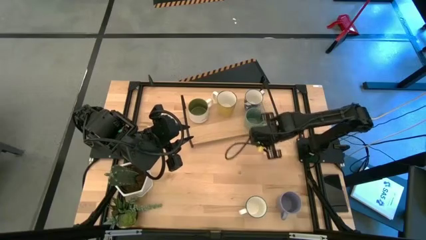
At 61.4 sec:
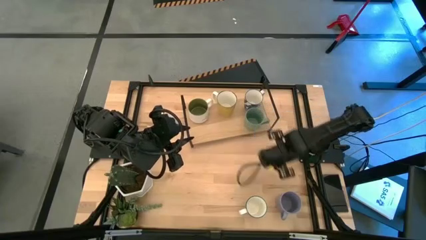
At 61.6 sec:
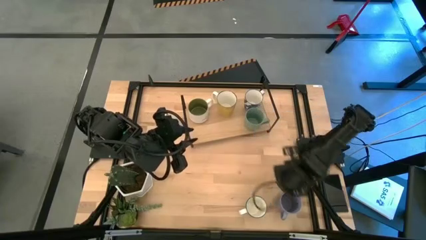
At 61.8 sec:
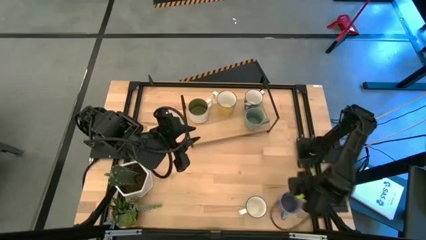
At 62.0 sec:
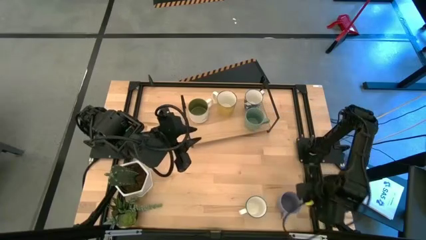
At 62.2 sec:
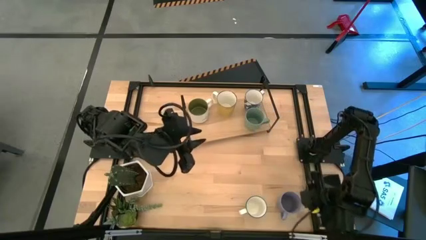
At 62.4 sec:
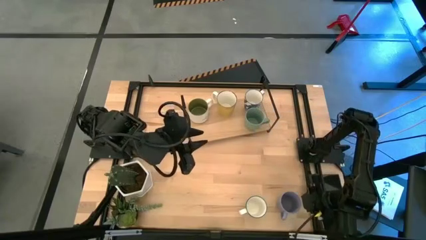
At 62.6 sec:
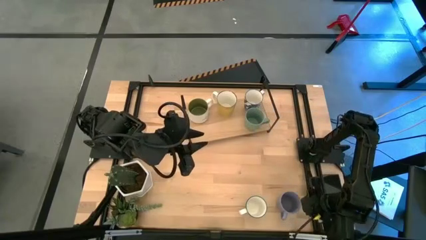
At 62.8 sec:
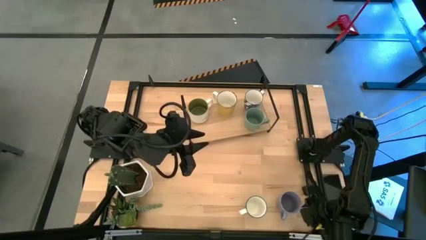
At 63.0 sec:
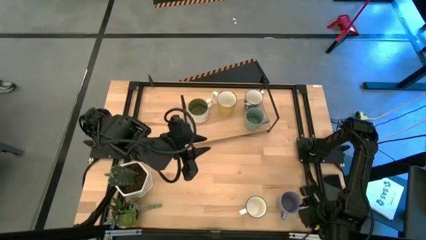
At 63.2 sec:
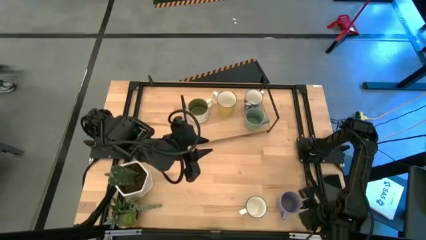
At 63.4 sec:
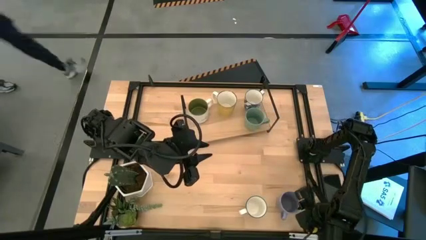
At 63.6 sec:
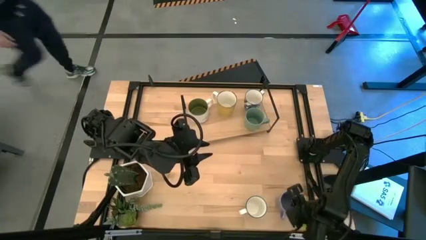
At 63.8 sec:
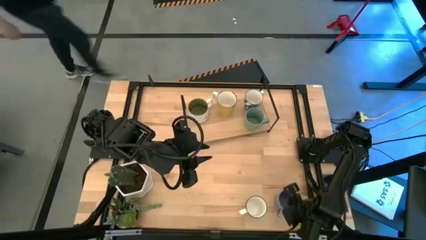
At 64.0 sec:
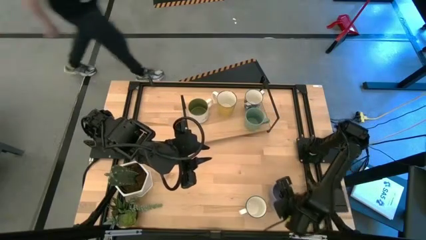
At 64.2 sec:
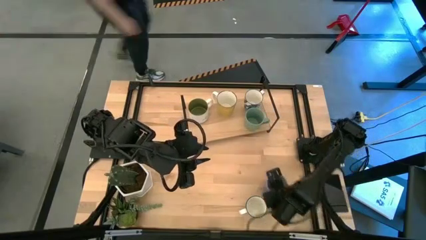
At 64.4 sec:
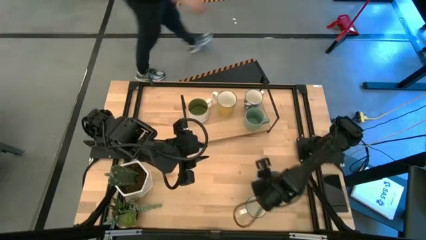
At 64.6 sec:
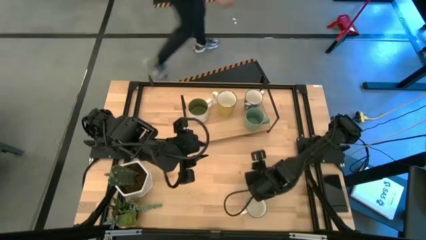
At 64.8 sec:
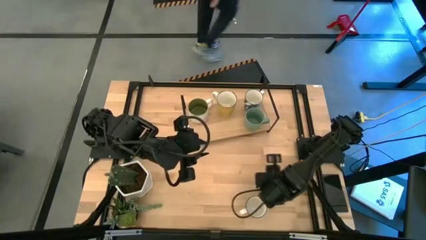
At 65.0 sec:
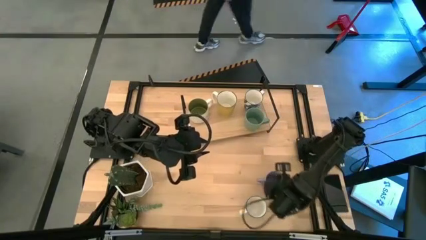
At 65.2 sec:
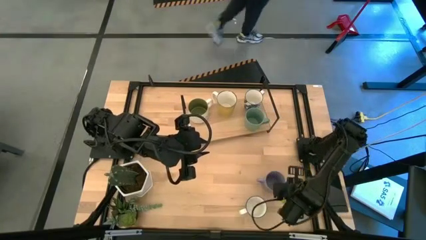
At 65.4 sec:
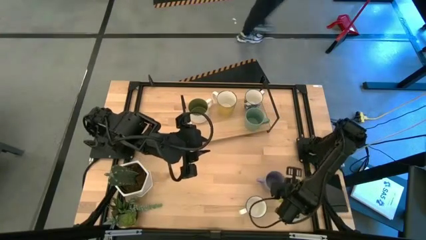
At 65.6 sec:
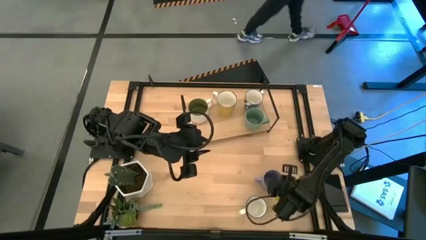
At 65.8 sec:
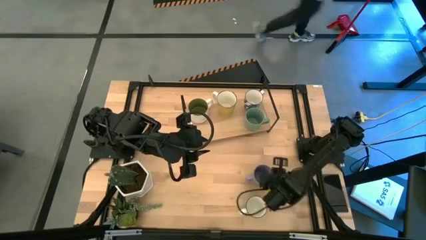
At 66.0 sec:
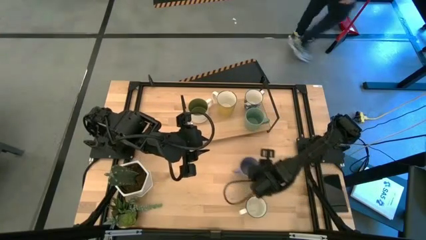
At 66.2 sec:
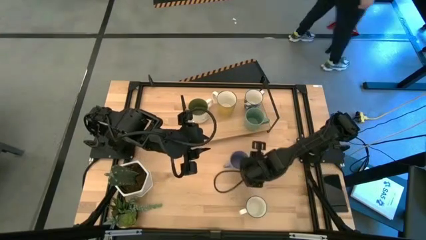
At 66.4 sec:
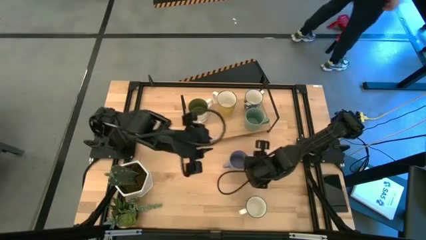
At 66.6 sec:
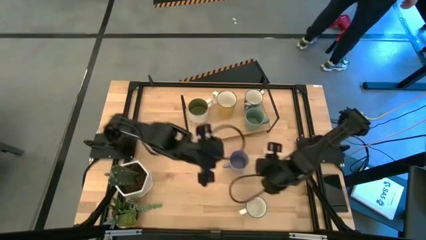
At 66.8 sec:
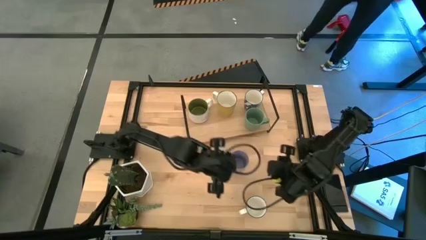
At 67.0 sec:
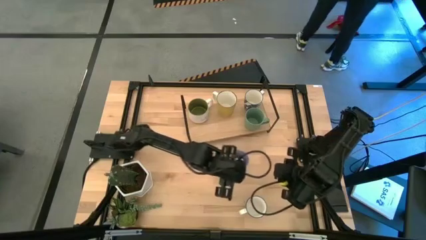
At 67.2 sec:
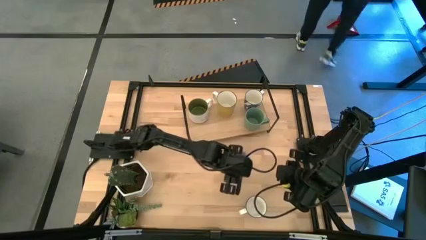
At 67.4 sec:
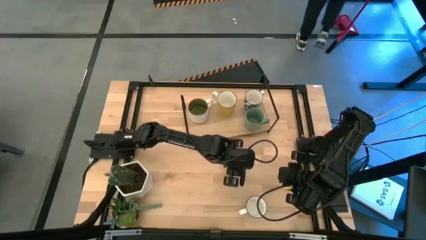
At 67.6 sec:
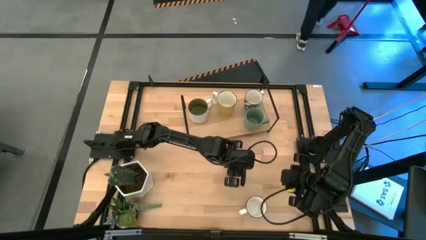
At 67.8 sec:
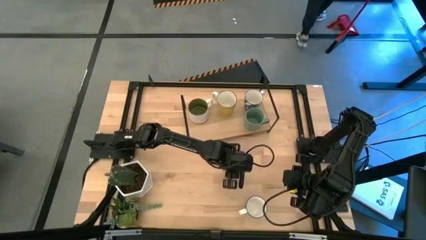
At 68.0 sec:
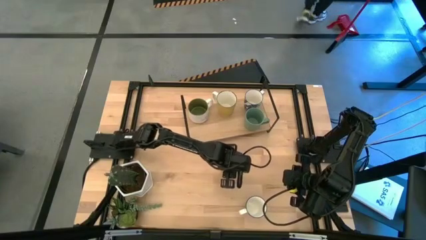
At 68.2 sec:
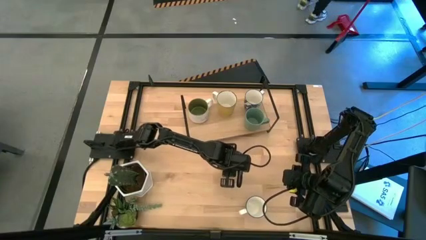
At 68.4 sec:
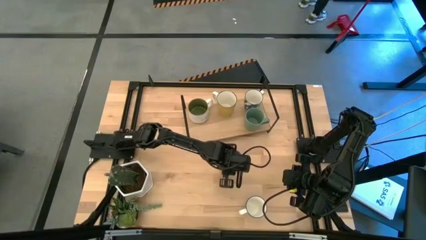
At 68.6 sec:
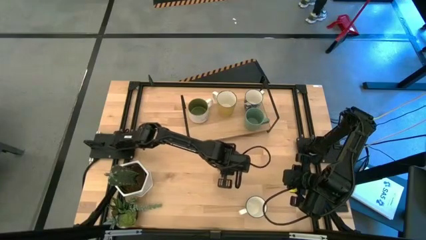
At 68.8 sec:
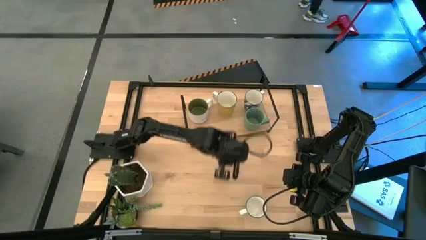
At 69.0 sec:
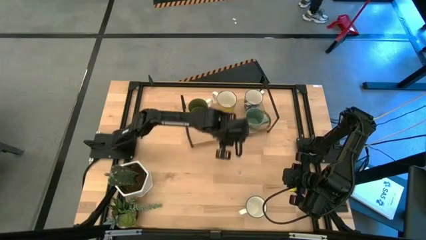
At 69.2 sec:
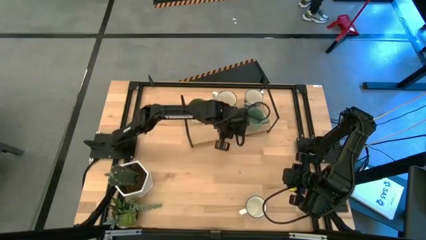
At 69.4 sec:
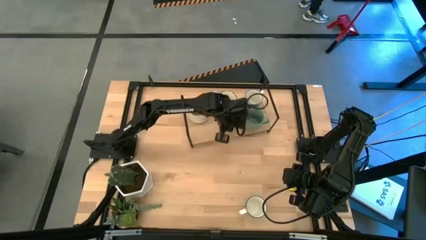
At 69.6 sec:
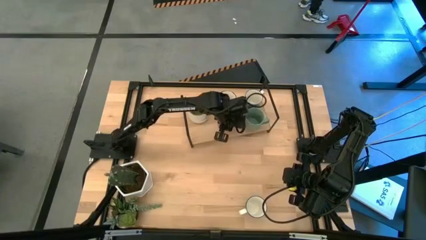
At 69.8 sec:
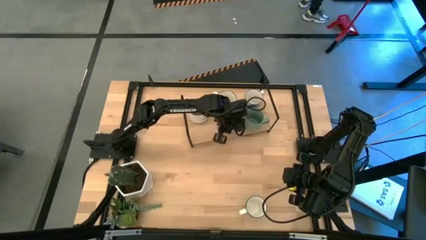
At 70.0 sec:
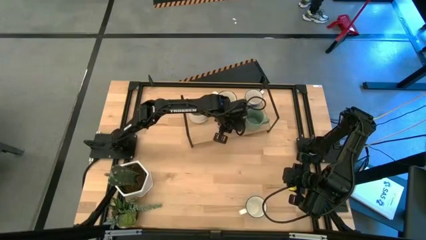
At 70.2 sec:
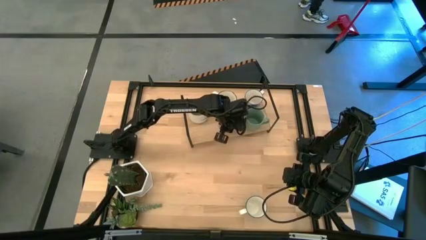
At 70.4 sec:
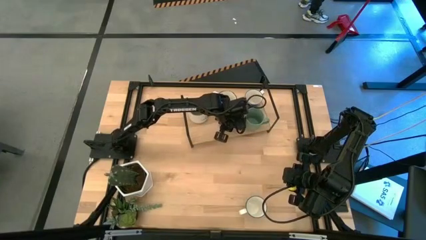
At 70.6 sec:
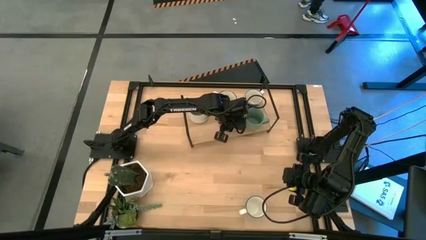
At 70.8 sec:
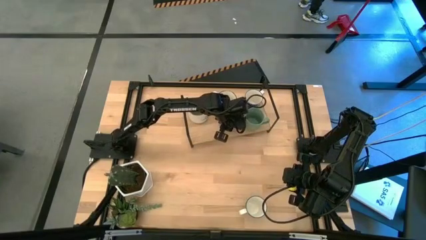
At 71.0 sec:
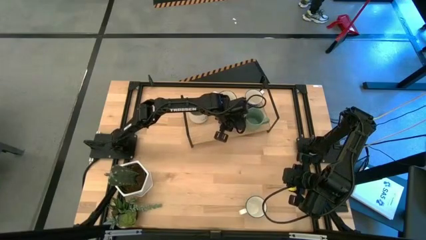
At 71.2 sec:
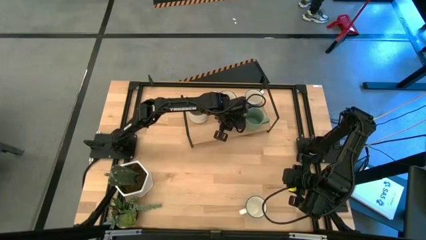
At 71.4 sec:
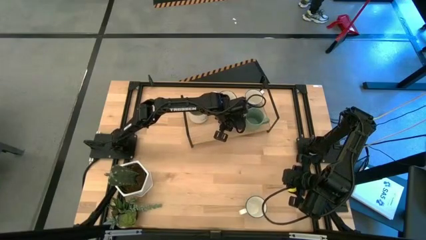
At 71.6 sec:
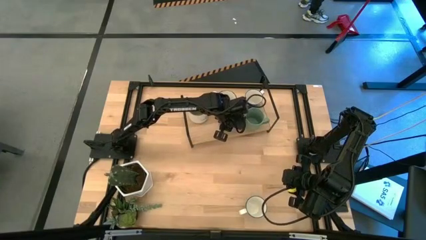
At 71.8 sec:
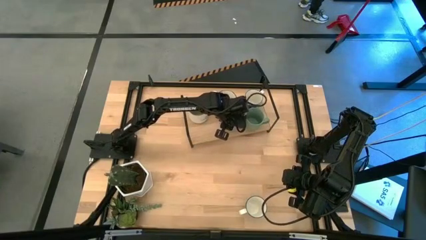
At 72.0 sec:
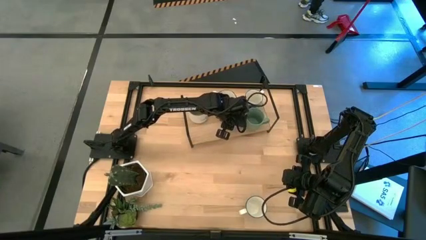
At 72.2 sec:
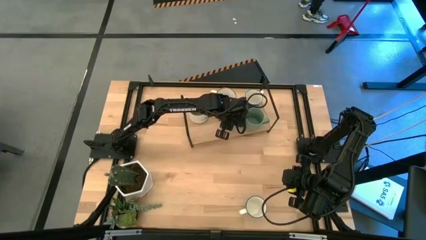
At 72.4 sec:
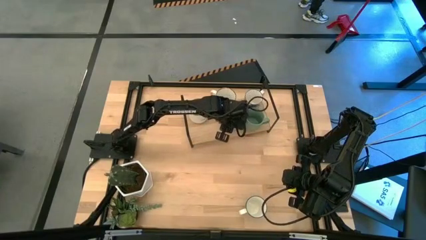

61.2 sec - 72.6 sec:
Task: Place coffee mugs
Put the violet mug on the shelf

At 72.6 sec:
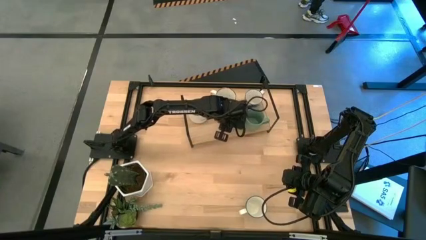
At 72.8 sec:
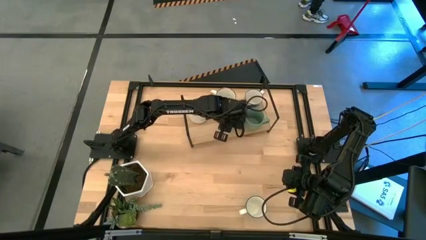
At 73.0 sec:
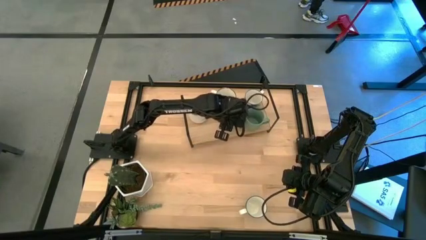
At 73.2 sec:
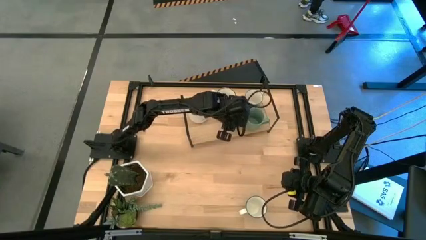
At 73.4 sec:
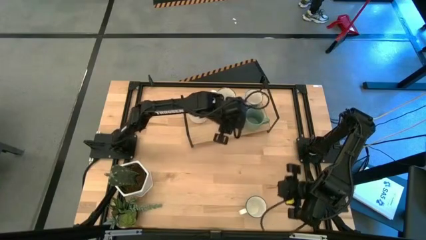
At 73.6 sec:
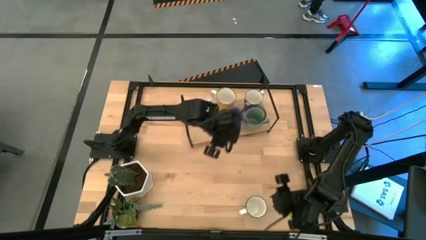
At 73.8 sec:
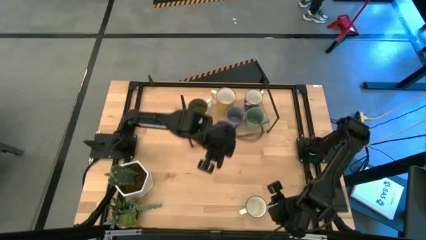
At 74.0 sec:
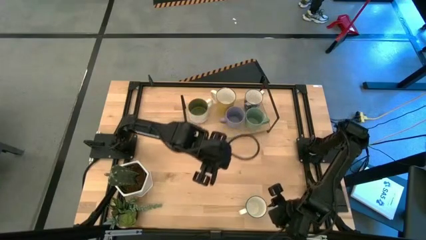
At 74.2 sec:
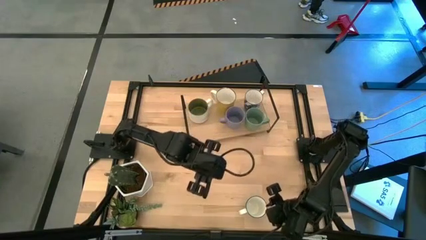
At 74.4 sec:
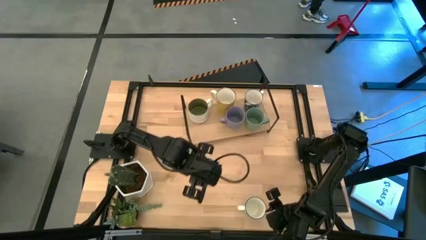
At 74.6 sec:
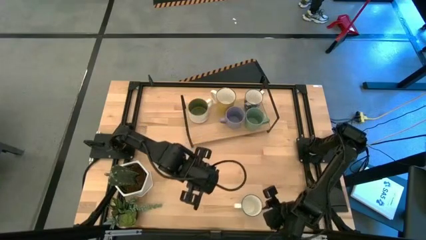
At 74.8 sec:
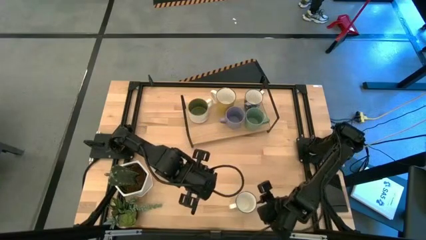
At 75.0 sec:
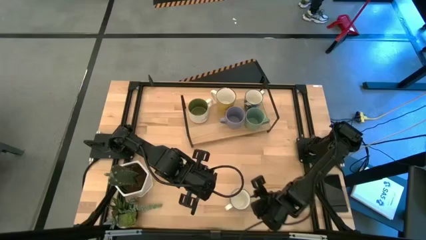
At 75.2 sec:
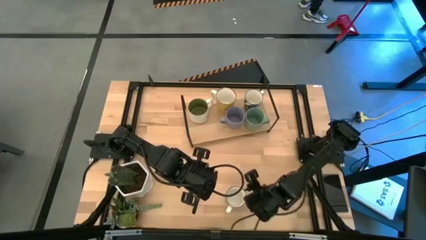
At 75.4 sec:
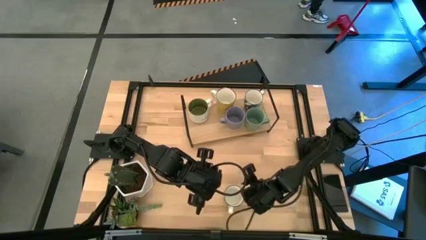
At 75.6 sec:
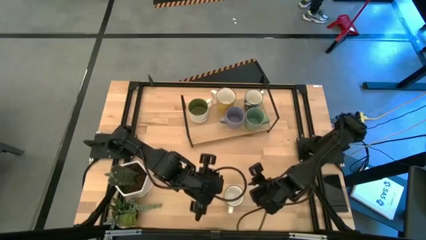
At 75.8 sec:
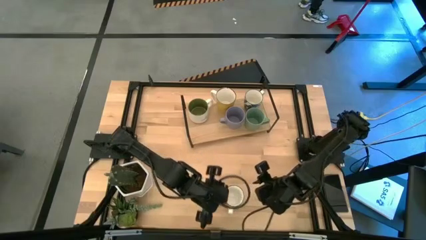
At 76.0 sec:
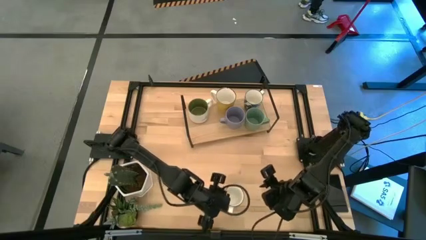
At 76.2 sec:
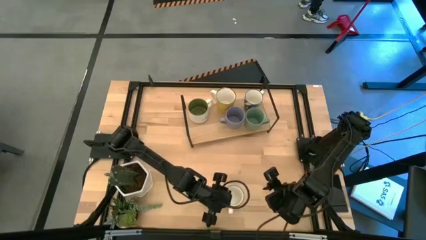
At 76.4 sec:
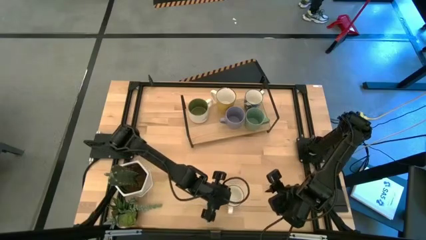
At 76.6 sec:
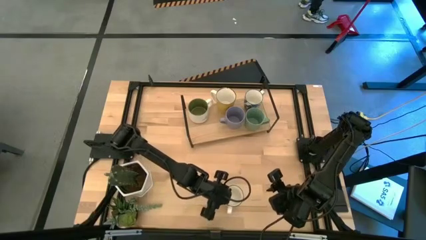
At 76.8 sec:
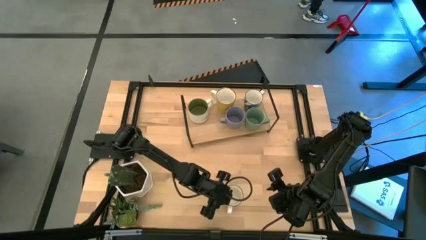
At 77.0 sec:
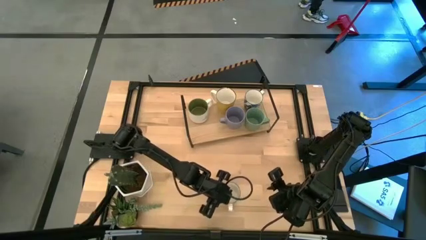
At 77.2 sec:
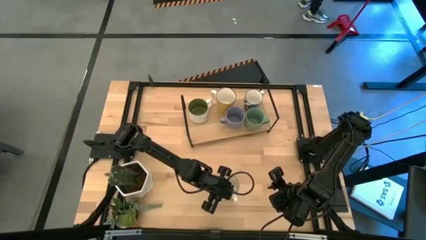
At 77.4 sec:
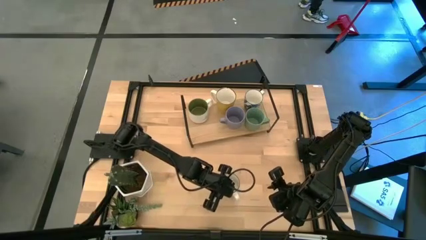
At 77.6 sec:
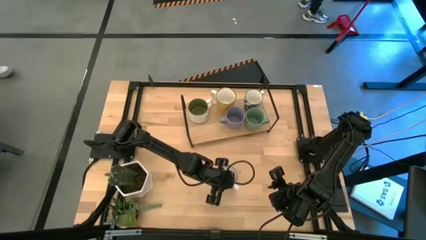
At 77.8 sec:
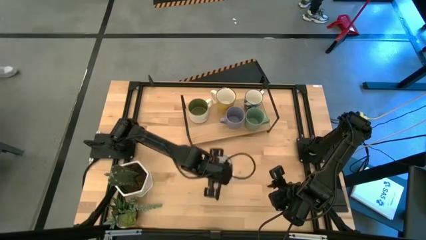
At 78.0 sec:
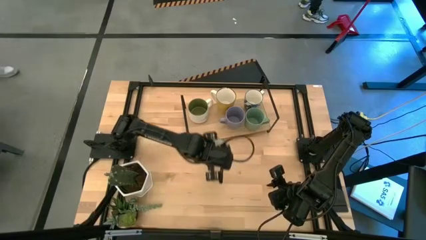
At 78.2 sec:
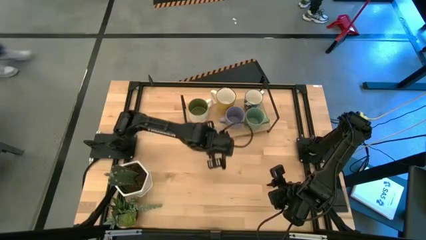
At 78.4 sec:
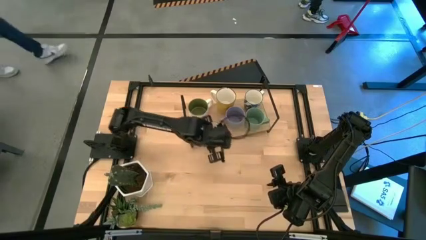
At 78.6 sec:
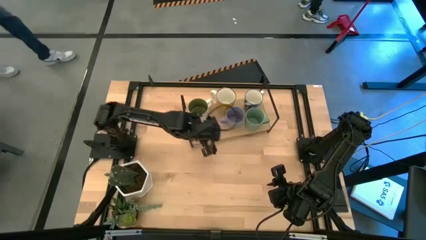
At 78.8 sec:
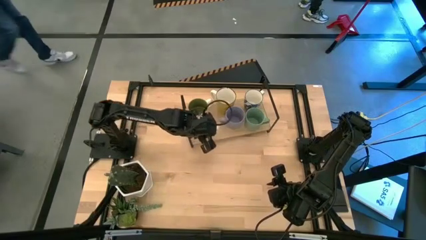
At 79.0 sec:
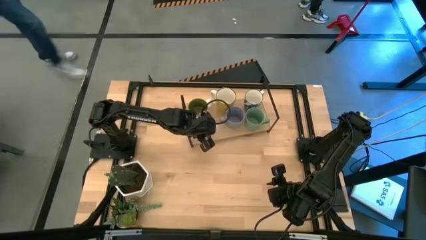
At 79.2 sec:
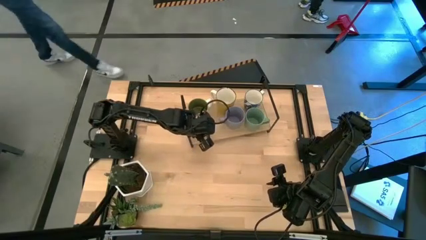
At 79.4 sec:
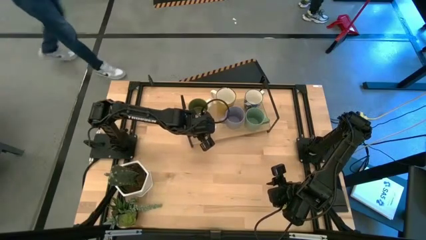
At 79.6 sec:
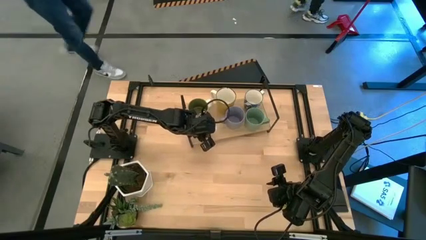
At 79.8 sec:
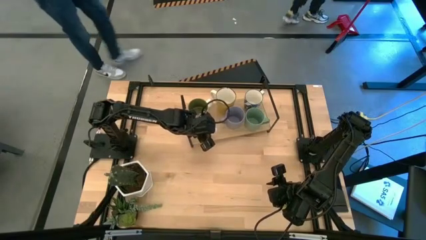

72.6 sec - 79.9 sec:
Put the blue patterned mug on the shelf
